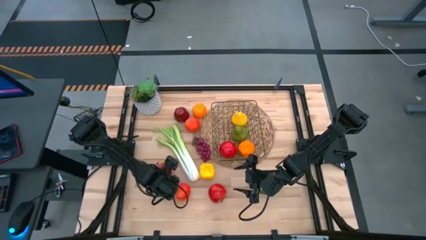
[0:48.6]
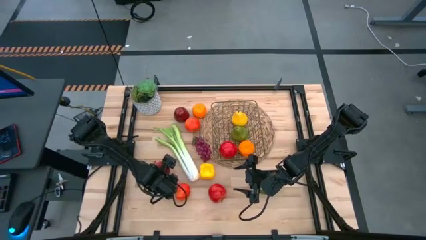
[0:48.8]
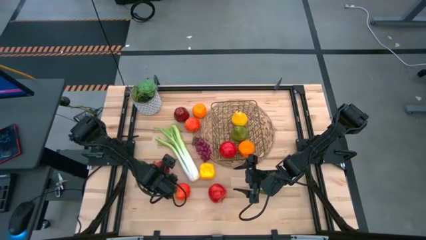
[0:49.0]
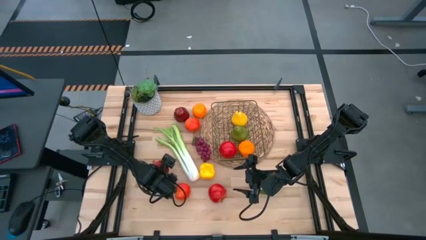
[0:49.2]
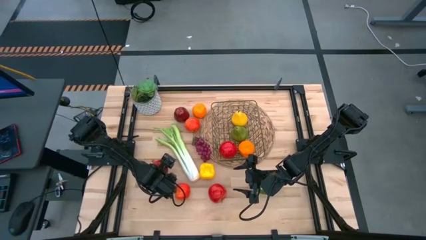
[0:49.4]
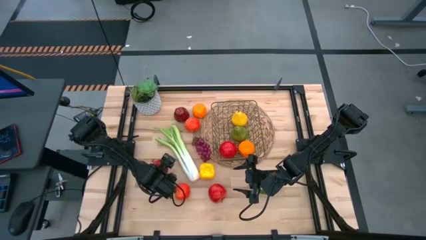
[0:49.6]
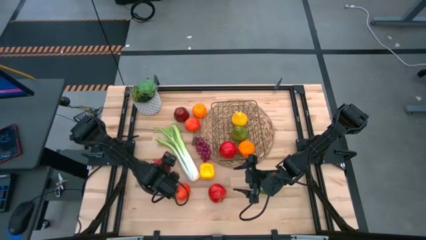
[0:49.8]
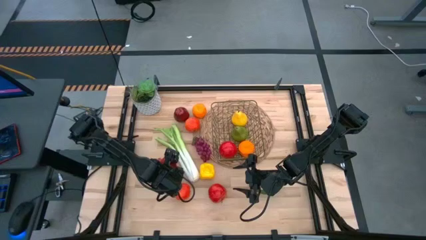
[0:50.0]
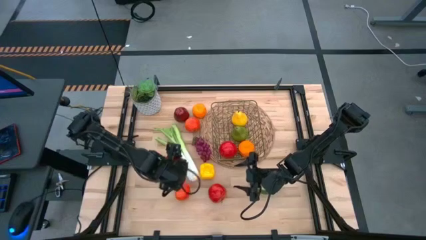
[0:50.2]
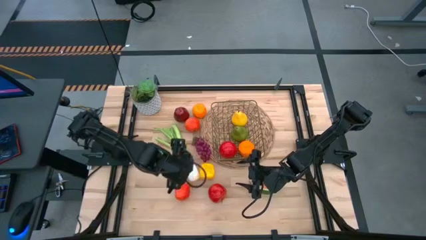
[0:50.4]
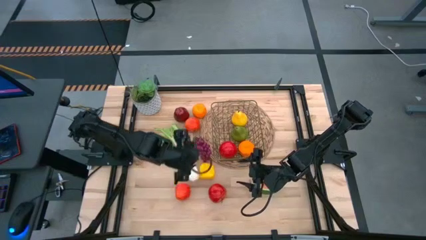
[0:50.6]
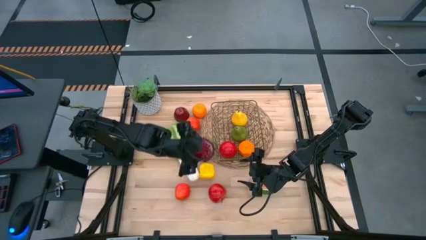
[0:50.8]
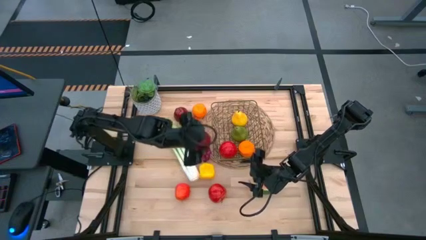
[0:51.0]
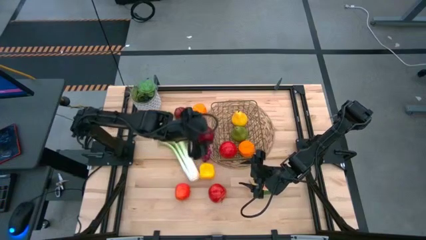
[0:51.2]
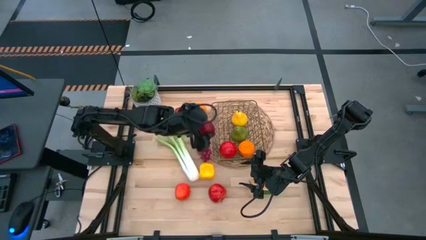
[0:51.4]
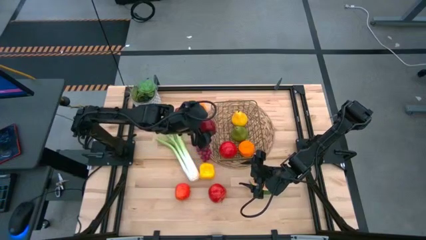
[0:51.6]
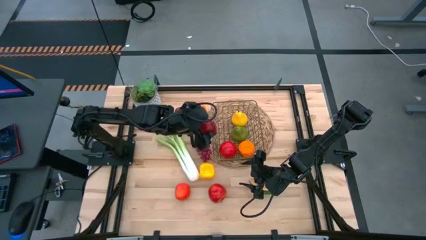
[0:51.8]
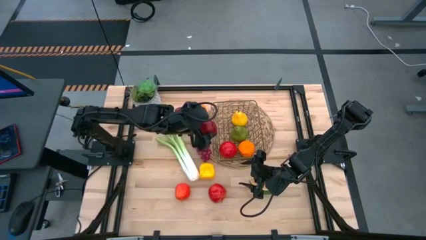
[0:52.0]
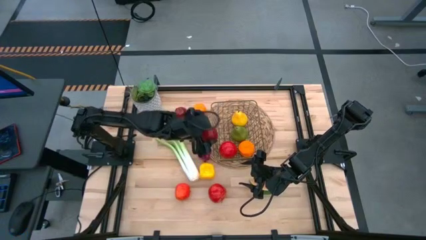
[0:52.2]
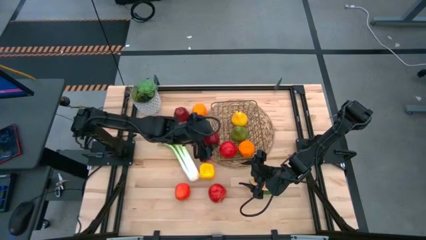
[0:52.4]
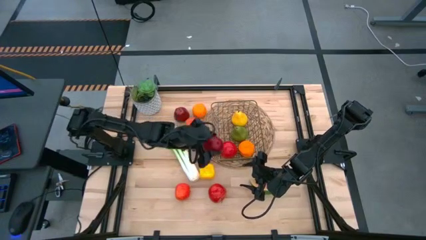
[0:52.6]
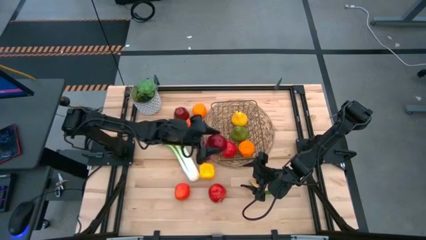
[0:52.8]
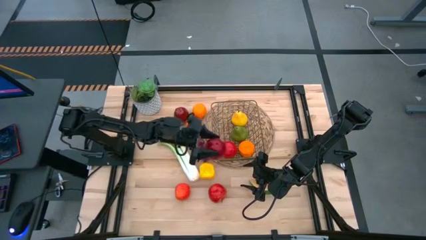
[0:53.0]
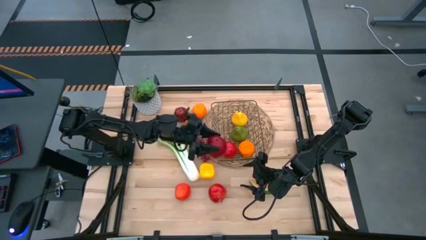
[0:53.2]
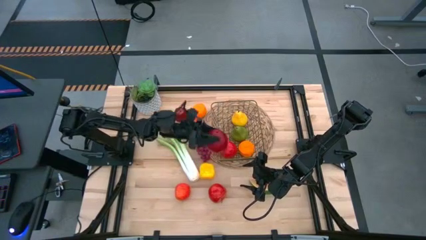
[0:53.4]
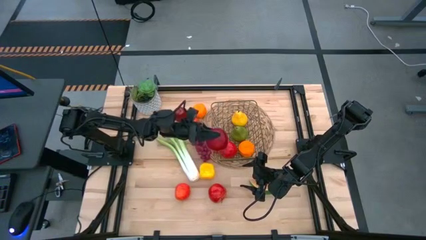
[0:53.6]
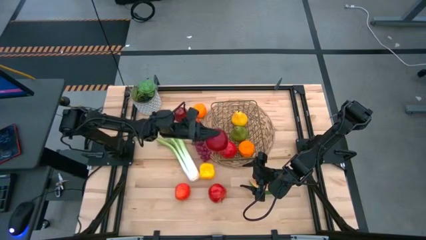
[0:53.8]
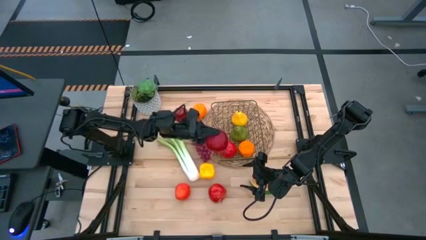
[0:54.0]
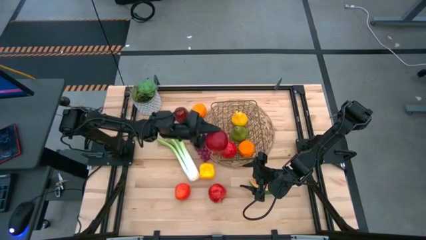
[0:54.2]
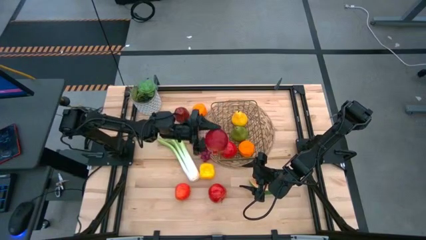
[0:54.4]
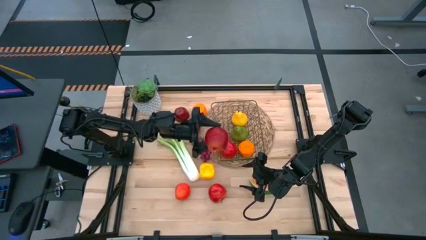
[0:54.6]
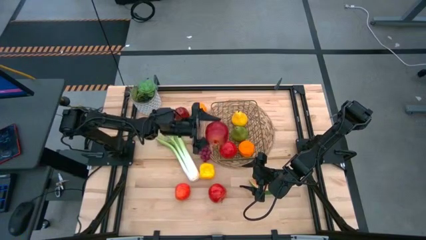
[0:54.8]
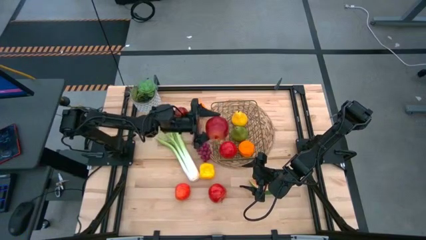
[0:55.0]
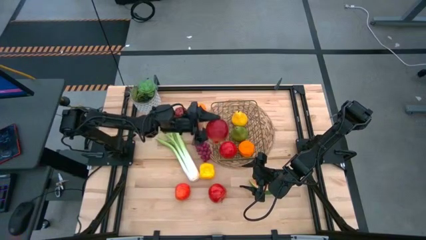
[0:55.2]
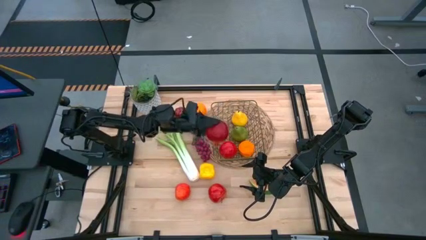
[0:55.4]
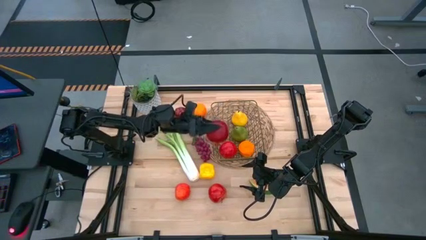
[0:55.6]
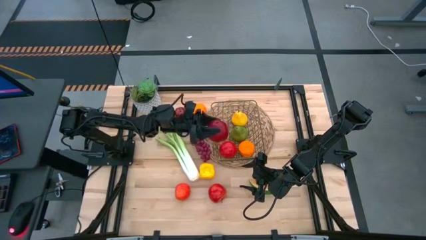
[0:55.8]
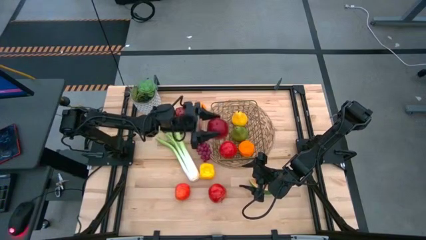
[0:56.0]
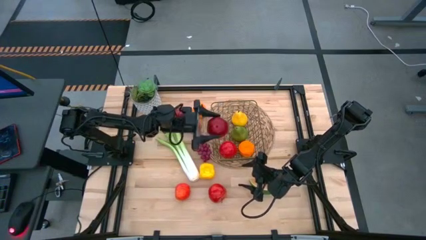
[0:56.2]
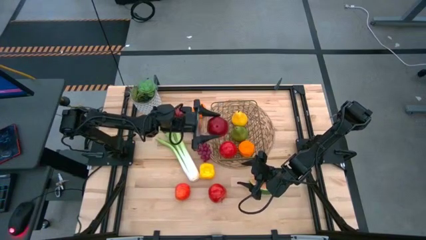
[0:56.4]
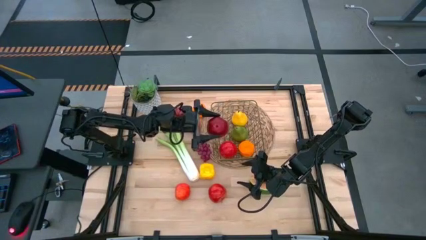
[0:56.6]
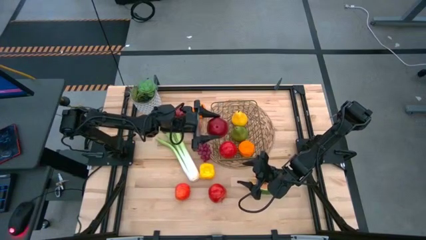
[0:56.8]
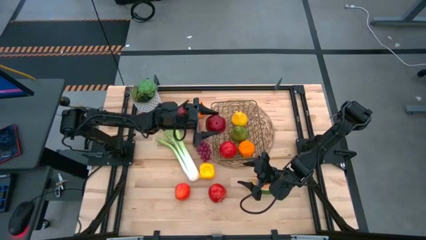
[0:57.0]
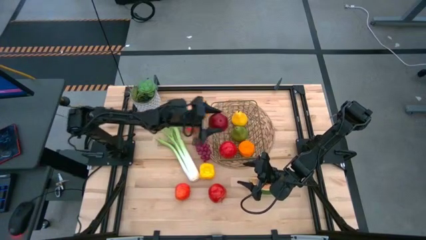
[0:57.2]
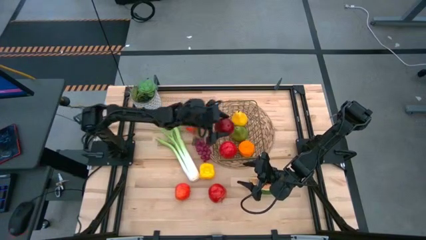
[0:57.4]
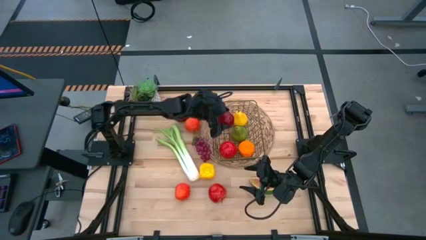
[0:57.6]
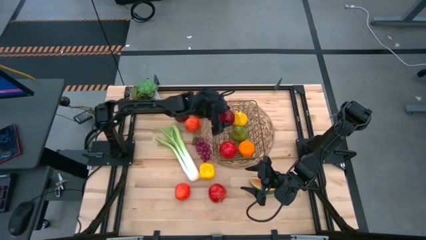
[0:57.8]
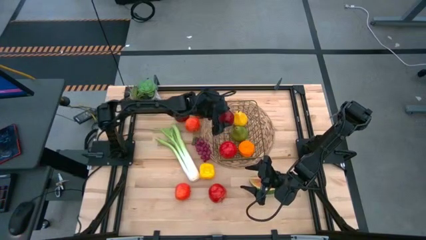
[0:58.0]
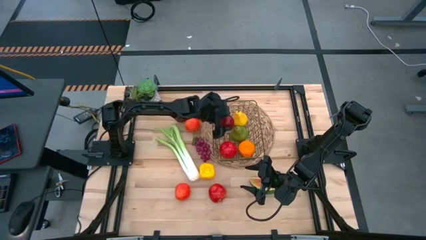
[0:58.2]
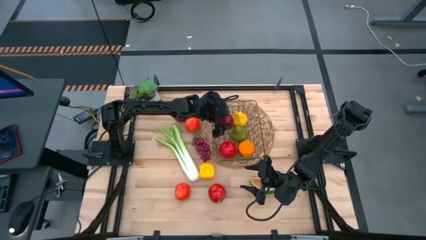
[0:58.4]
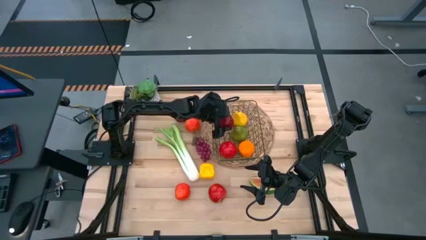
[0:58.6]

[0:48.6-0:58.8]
Task: Build produce basket
Put the pomegranate into the wire basket

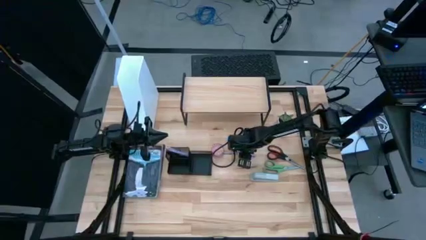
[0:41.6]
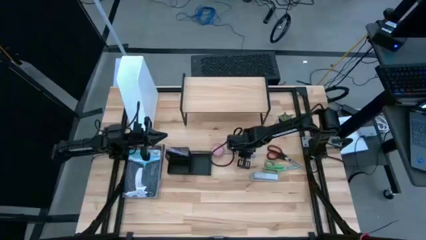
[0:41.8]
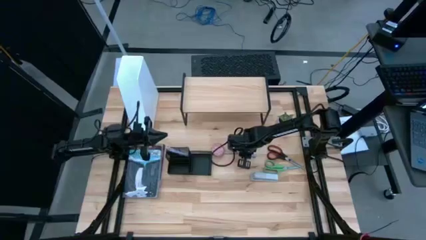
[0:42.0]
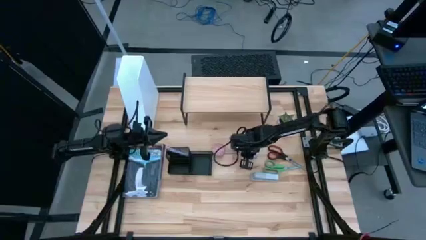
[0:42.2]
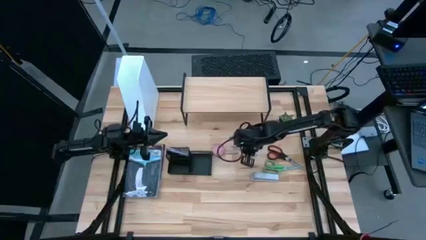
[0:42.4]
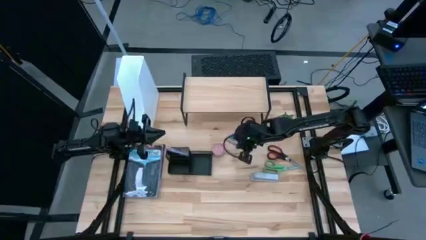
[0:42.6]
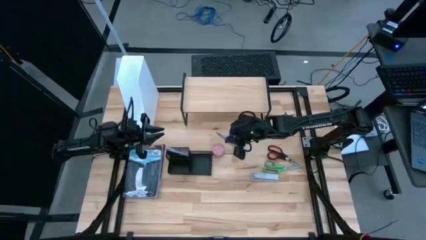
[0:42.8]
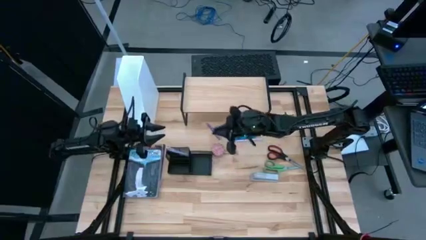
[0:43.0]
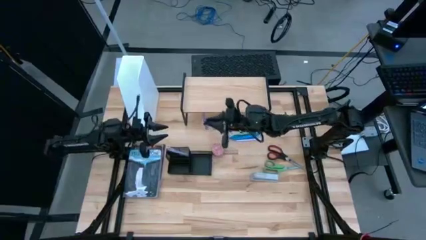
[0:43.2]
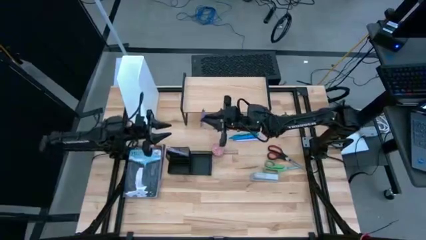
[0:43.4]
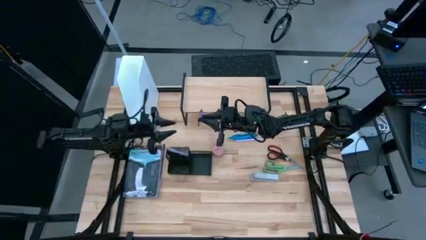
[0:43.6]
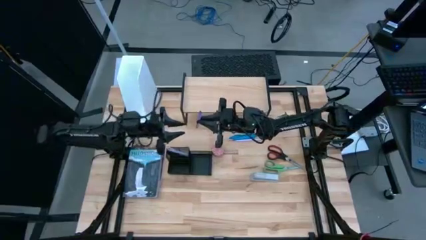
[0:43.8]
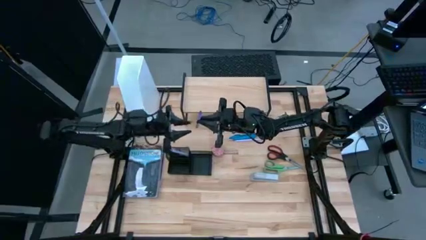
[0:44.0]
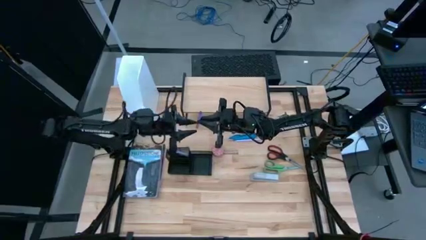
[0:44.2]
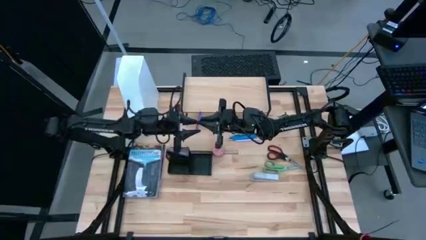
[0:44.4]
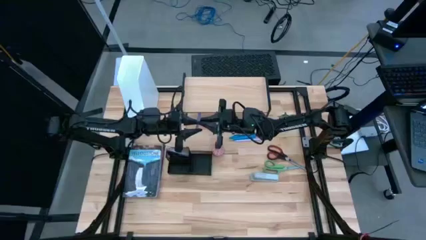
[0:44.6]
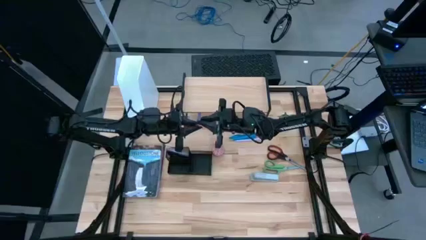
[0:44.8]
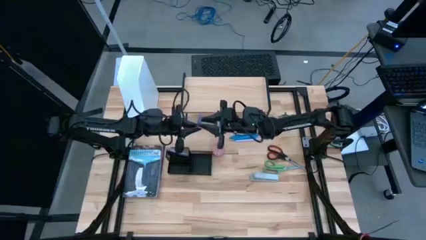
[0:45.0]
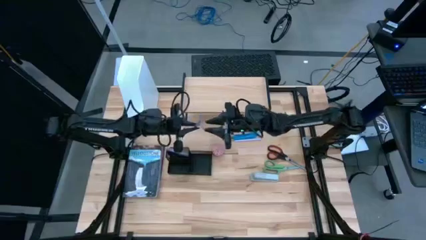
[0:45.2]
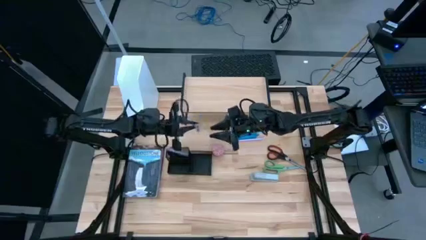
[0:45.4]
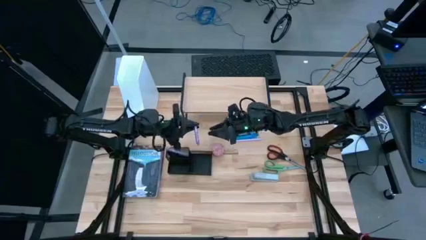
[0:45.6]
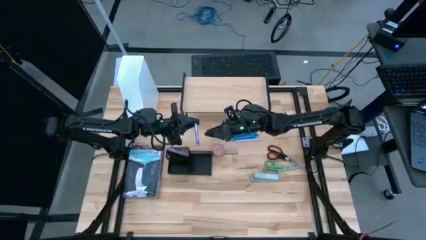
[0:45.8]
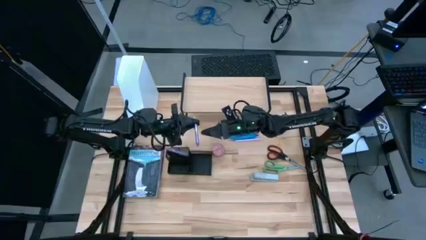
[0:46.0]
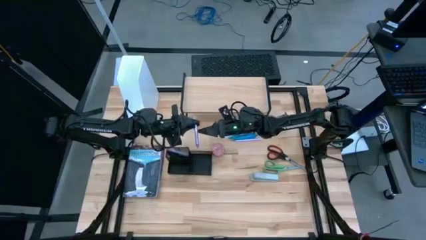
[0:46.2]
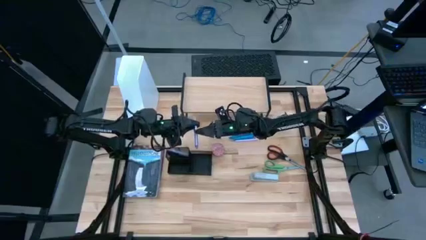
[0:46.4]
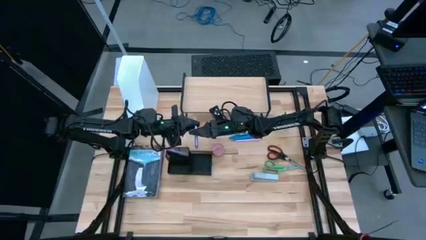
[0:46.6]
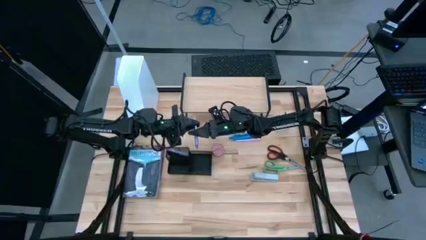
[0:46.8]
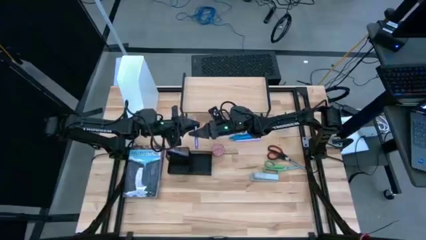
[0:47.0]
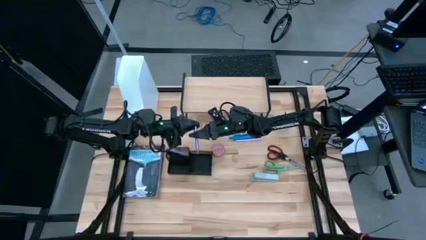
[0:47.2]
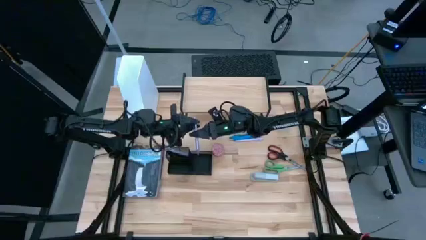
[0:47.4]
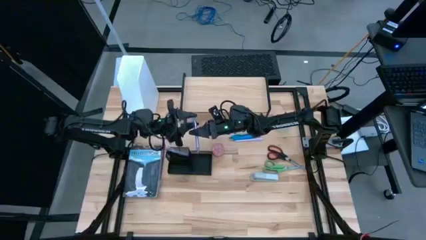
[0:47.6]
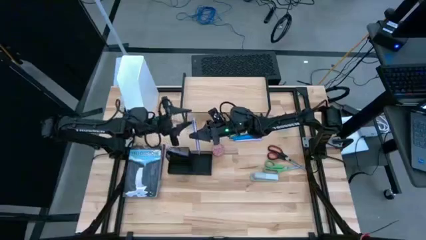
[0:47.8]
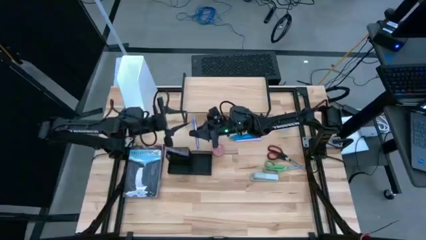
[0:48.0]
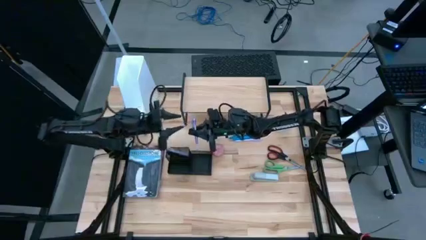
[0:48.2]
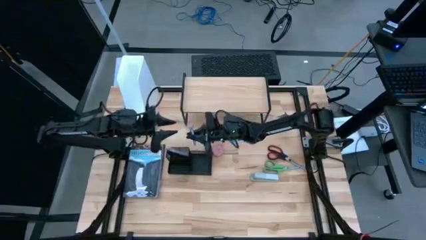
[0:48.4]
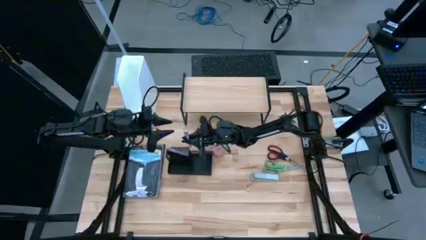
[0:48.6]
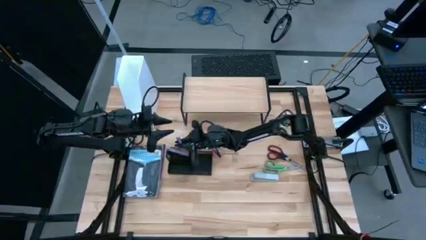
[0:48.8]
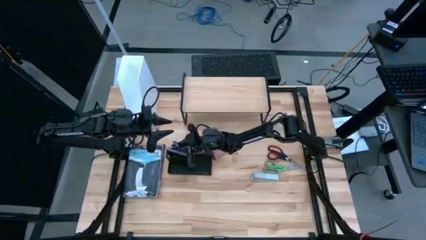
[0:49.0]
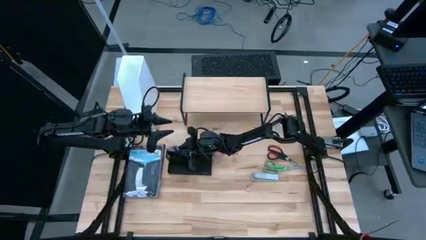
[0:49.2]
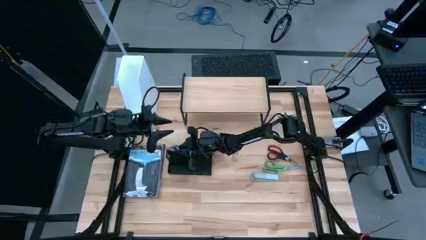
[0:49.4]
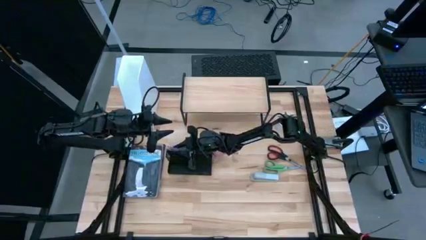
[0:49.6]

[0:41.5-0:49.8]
Task: Stock shelves
Put the purple pen into the desk organizer
